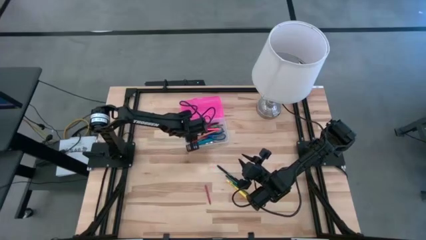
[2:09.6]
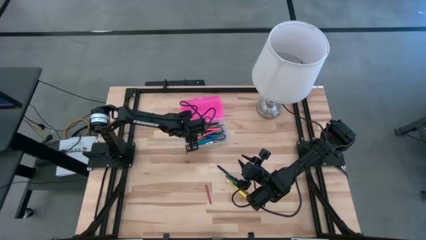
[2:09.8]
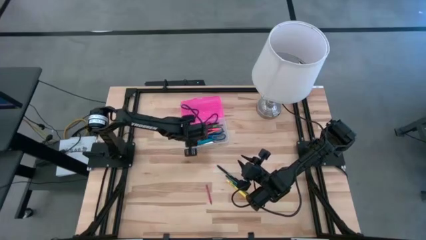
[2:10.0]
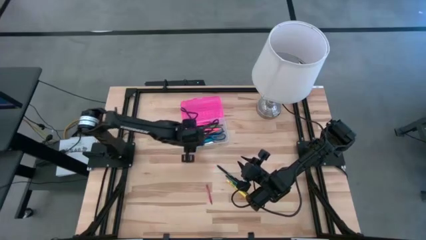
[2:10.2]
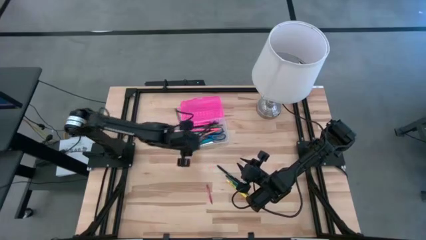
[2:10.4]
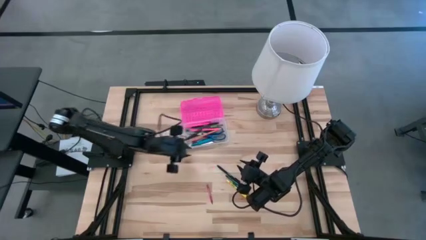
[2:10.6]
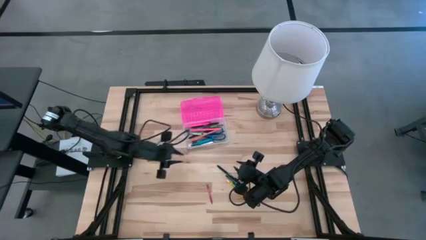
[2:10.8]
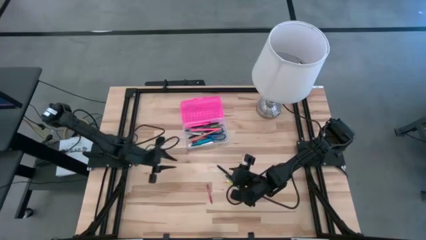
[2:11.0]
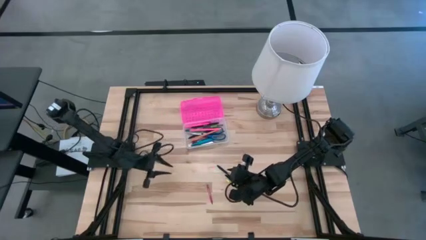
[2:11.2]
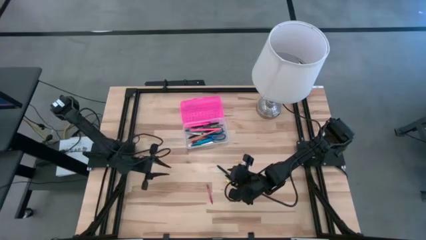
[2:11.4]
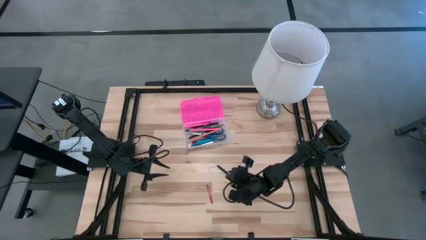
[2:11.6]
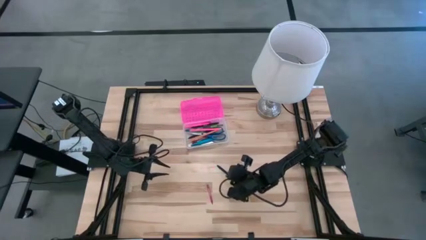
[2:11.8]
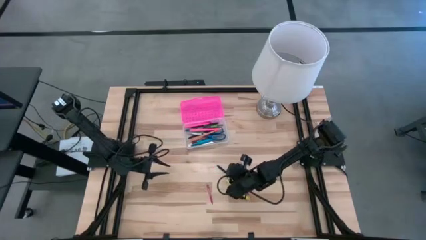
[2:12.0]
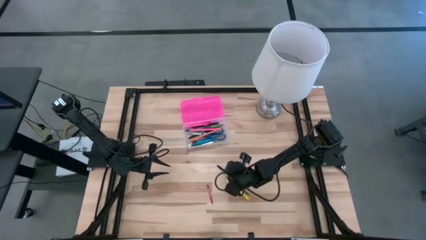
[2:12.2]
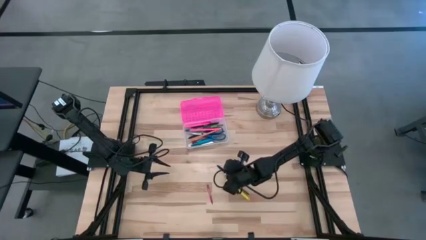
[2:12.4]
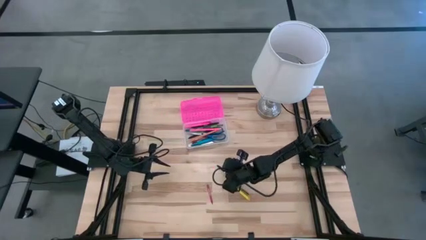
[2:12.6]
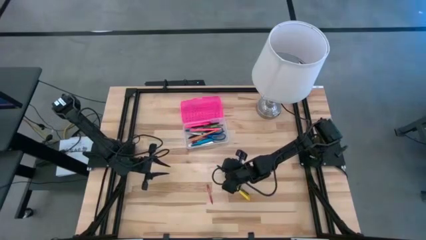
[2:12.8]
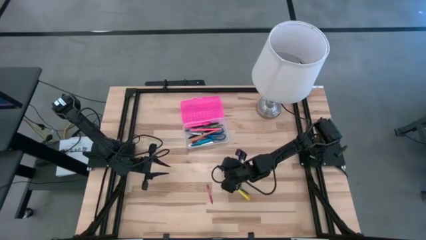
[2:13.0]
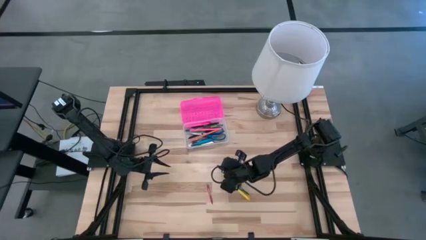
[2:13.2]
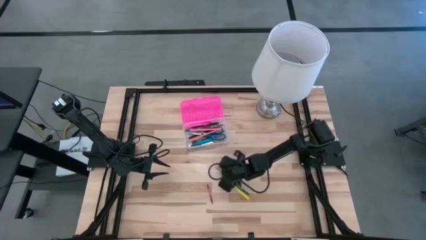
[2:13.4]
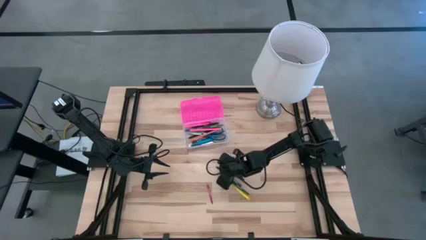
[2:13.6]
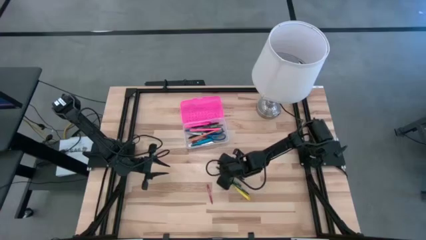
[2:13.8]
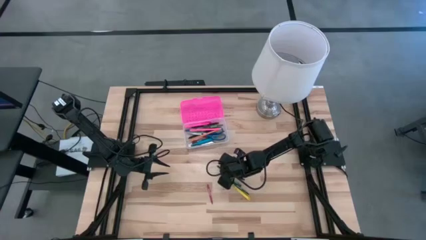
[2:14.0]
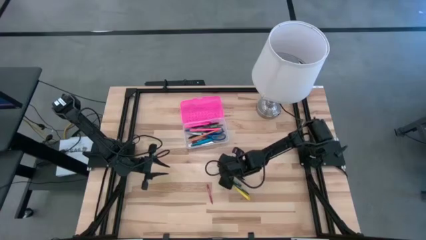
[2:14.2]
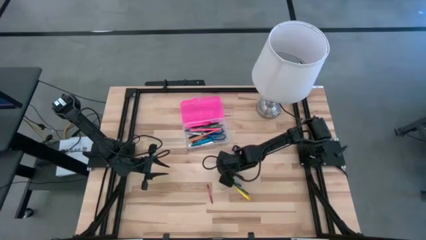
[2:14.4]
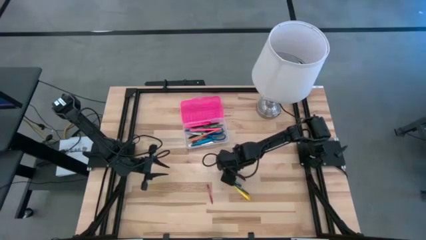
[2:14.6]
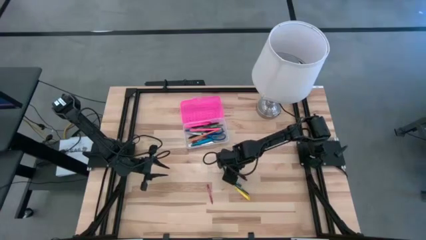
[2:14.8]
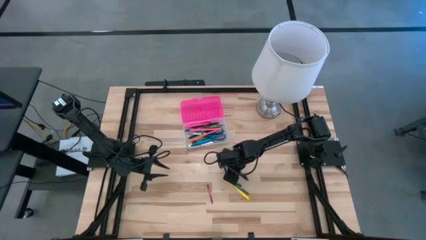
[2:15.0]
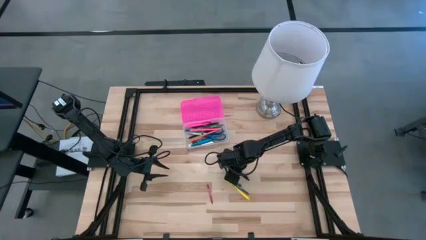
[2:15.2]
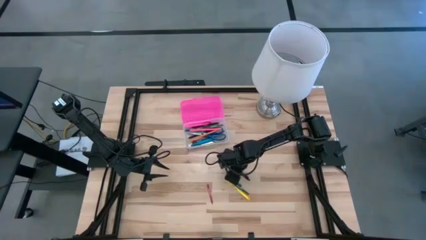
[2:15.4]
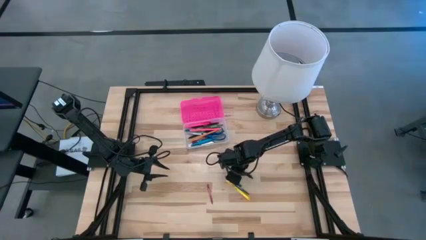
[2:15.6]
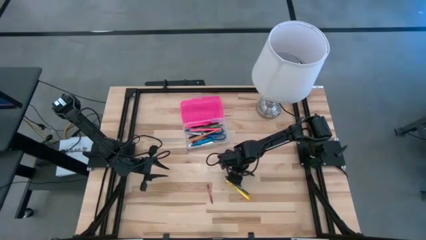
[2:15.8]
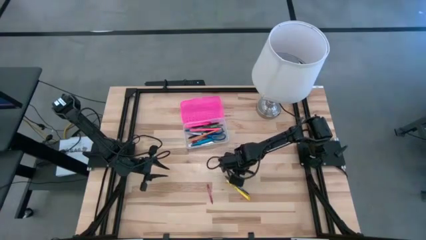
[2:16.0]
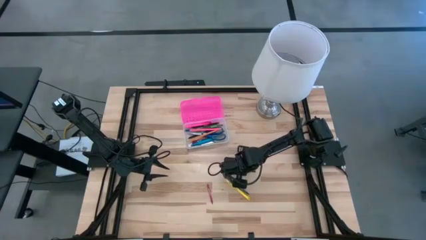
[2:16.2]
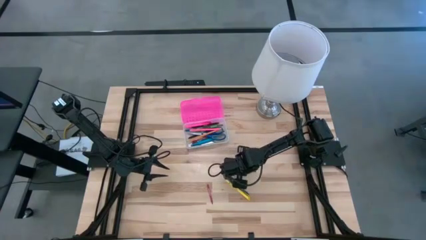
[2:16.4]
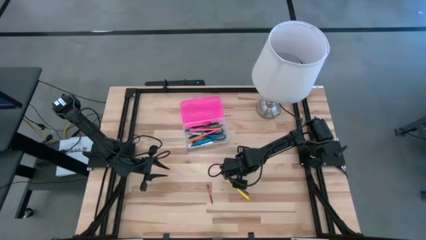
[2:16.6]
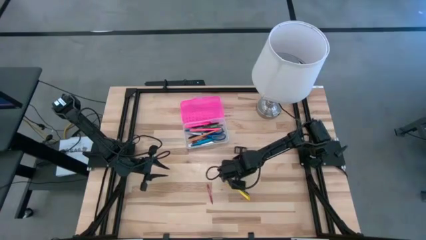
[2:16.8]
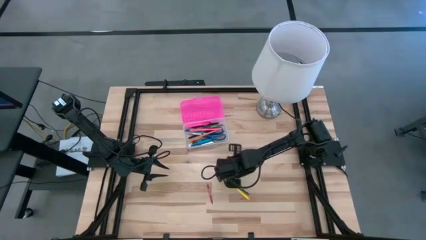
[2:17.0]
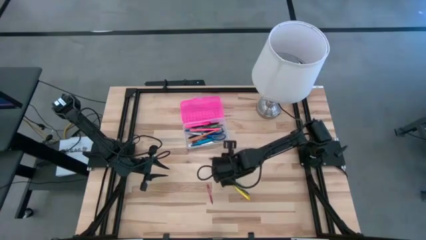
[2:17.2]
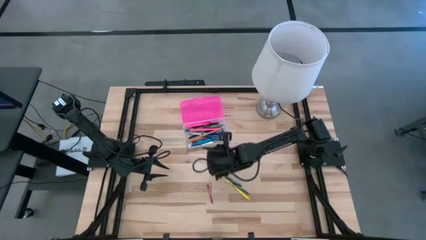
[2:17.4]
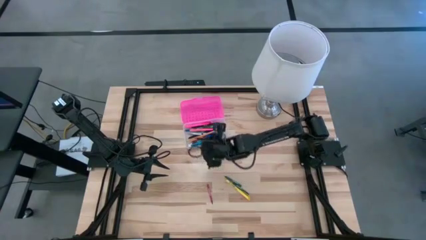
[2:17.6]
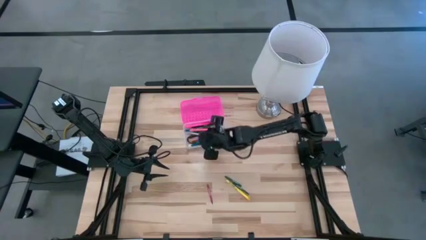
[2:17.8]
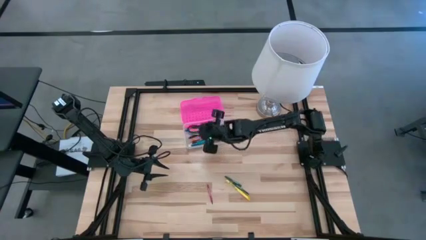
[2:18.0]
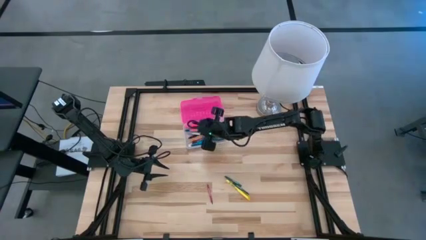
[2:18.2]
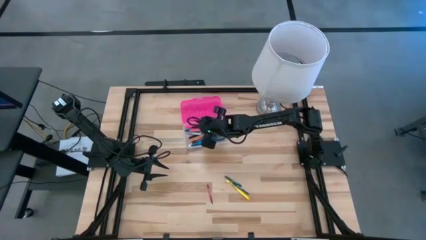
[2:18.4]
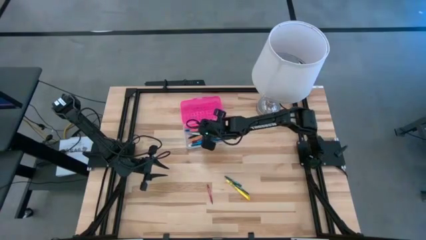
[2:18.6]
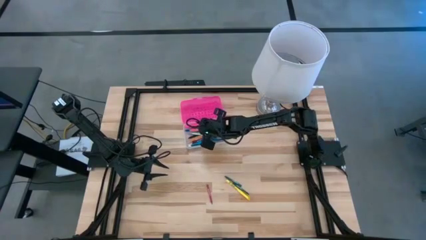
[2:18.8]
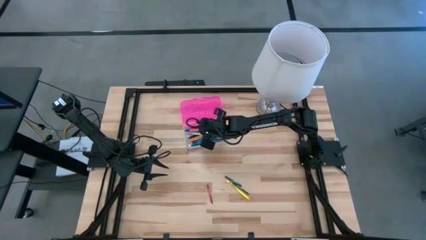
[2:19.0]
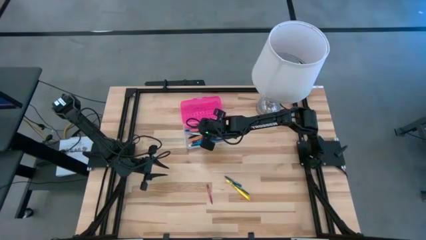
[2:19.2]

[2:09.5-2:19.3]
Task: Pick & place school supplies into a supply box
Put the black pen into the pink supply box

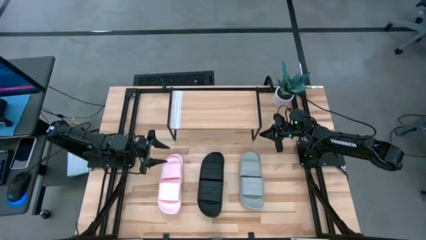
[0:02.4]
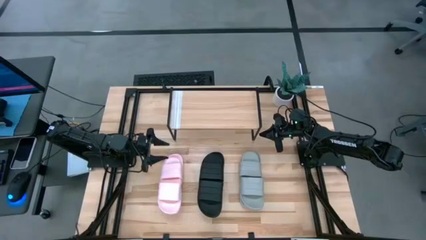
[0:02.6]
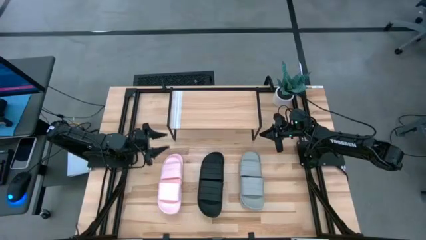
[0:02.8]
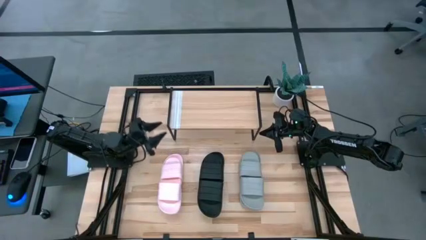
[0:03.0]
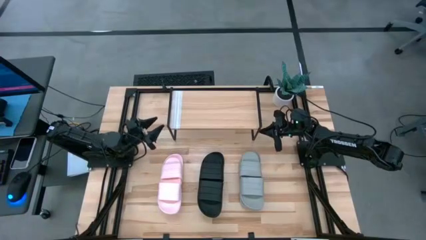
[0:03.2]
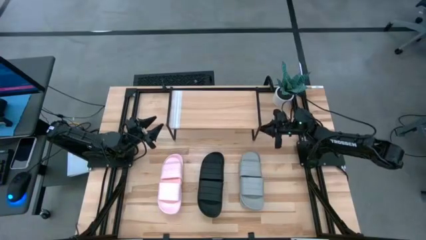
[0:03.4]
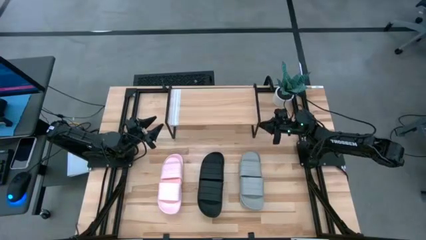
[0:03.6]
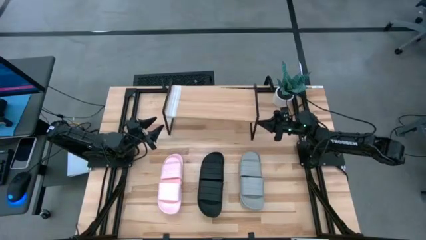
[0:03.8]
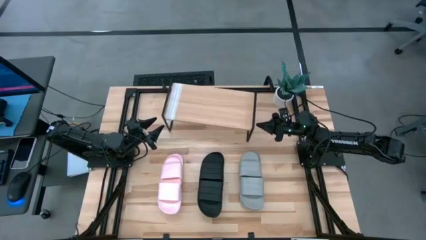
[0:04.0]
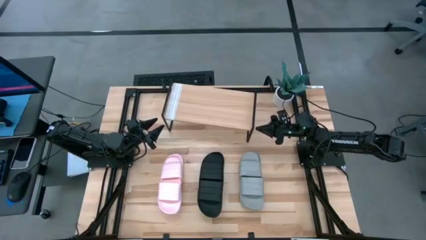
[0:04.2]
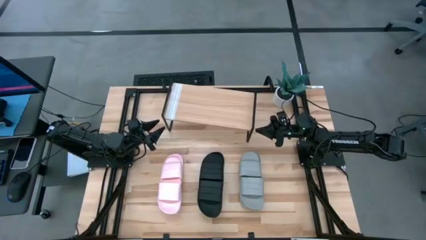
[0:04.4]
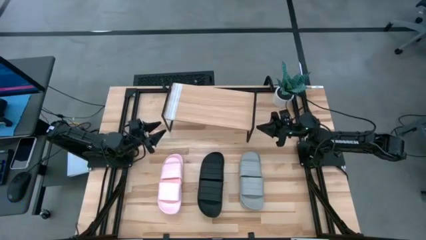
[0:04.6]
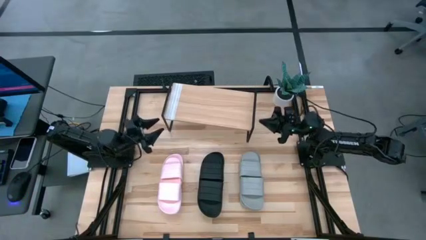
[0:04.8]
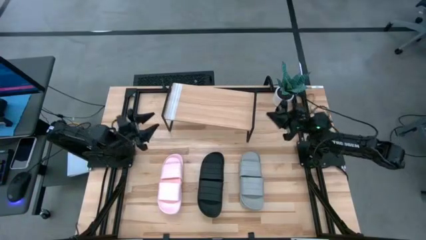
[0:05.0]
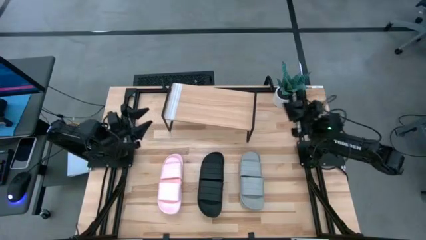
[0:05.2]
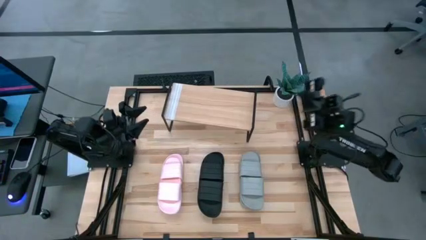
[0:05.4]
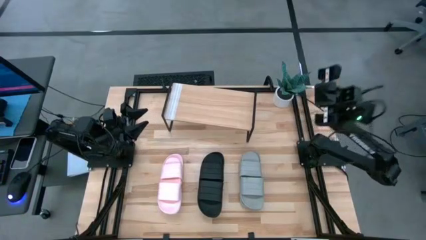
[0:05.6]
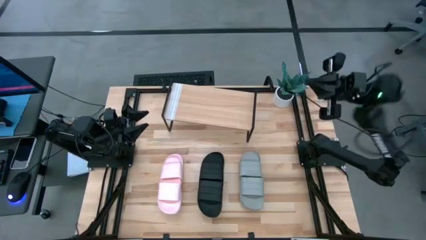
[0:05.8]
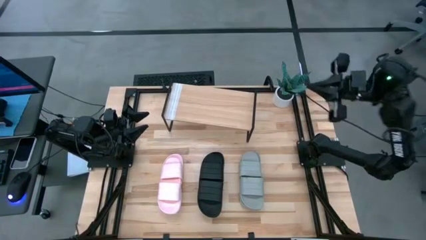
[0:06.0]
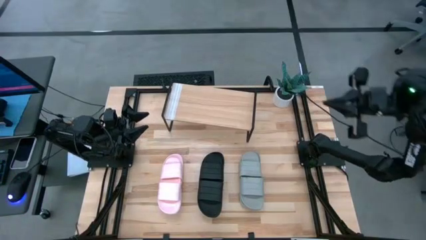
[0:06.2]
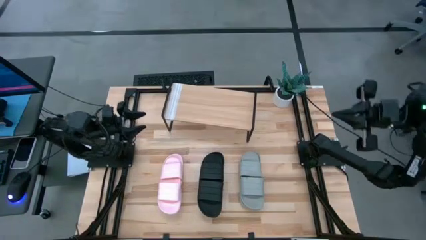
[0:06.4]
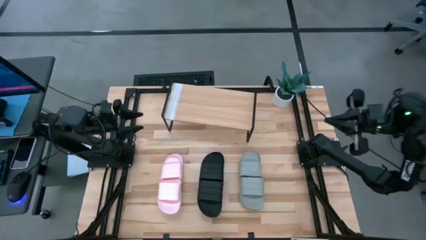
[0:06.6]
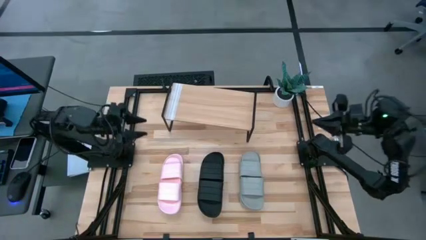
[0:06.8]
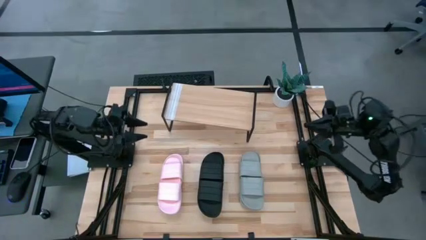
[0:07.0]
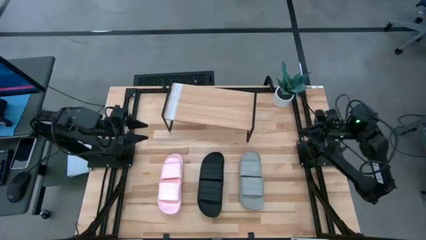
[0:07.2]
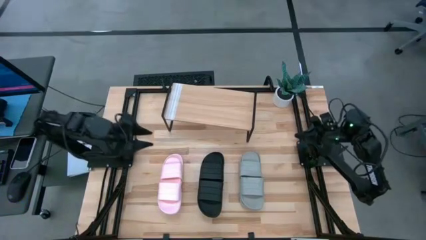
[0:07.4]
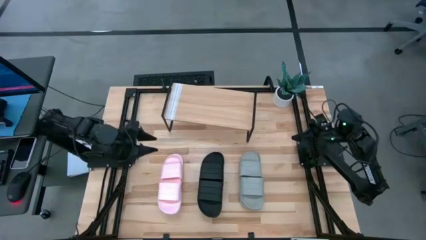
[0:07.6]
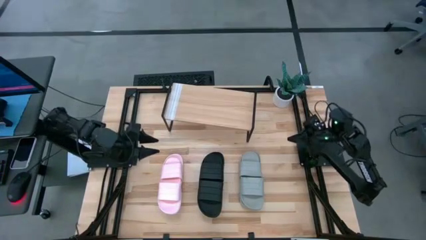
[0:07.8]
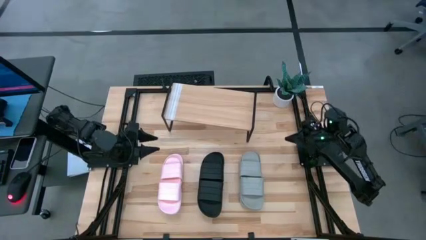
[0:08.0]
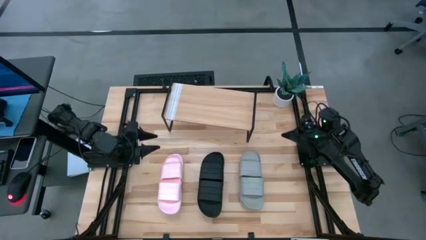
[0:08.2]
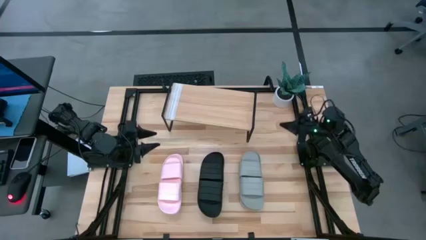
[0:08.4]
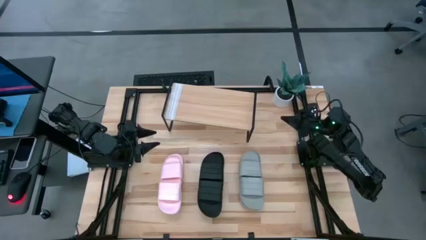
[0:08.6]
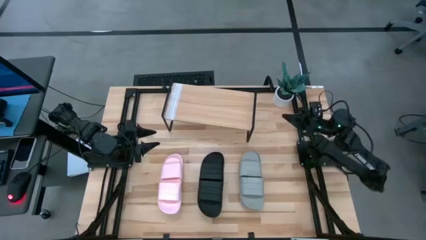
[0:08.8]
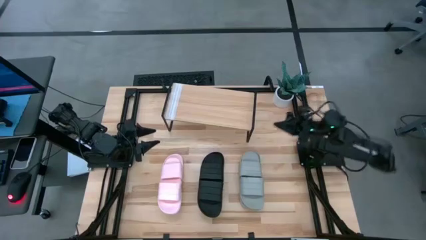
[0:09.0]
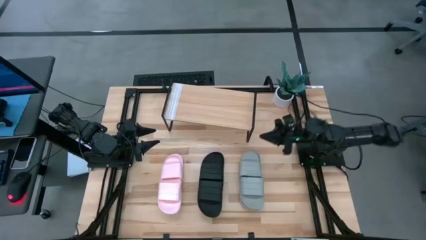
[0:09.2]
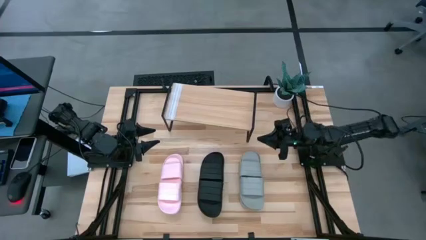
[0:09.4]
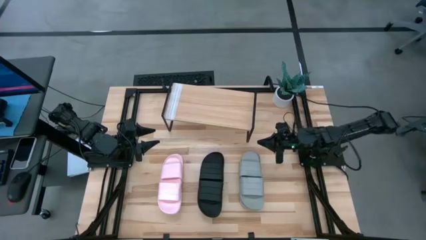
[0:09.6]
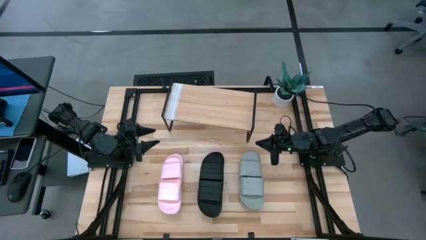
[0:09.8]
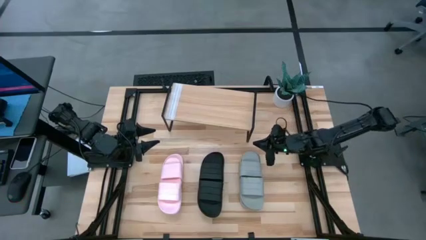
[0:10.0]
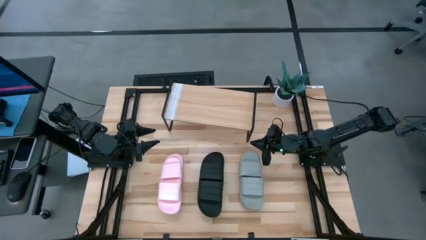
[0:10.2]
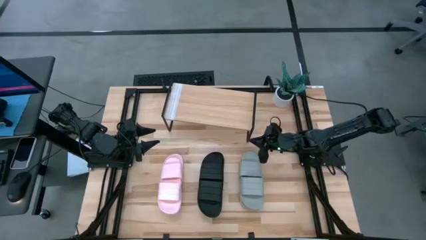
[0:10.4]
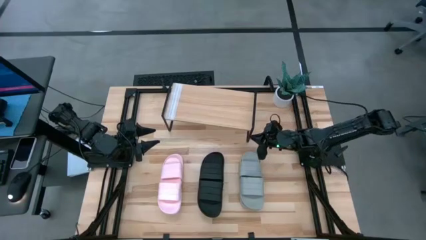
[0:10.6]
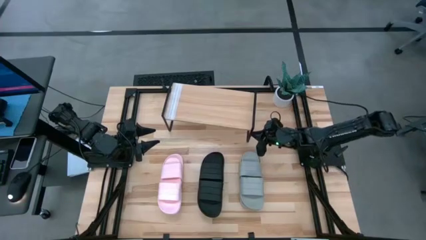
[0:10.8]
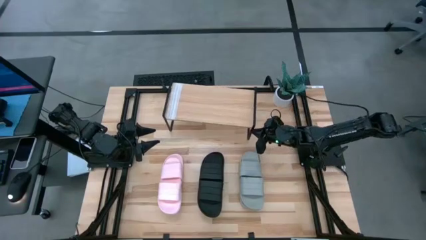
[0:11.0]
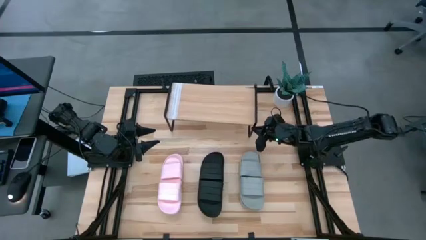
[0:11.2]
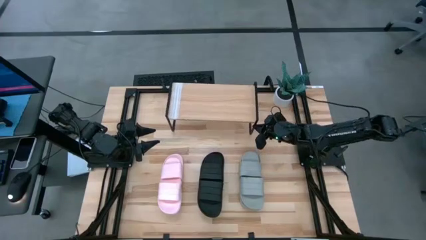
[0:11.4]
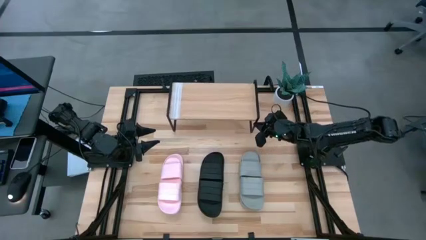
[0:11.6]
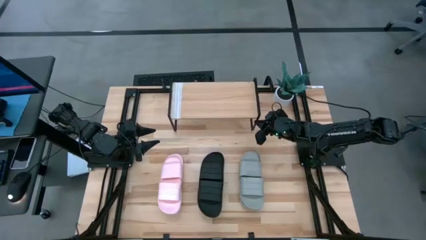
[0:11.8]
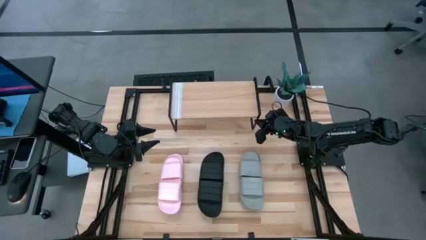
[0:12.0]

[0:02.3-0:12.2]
Task: Pick and place slides into the shelf
Adjust the shelf
